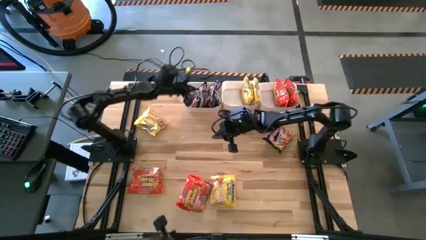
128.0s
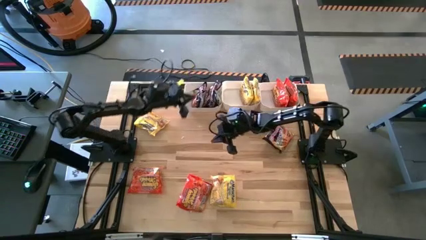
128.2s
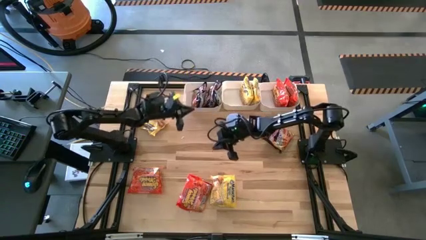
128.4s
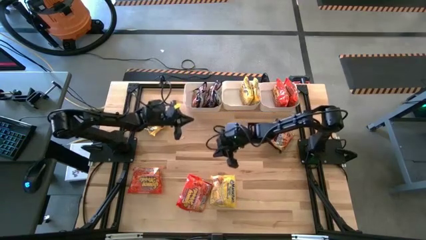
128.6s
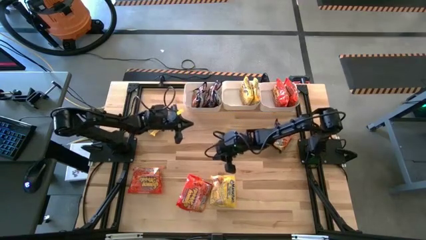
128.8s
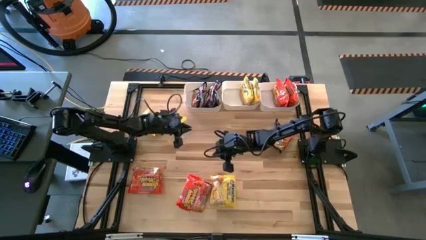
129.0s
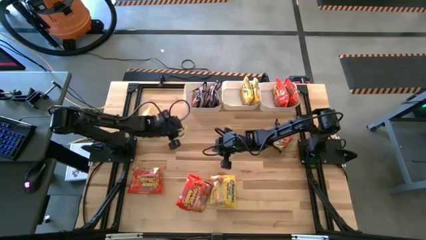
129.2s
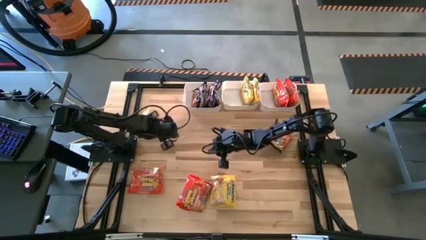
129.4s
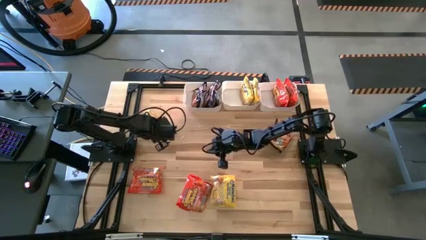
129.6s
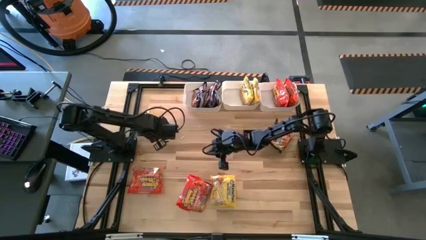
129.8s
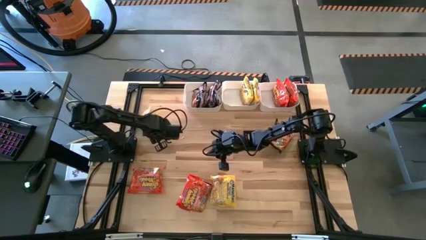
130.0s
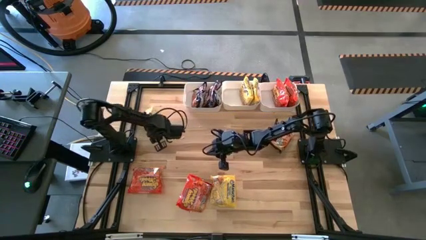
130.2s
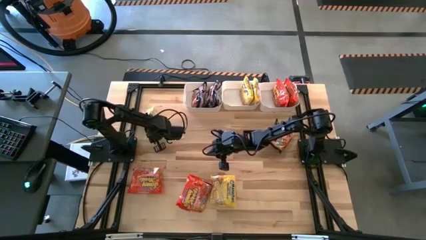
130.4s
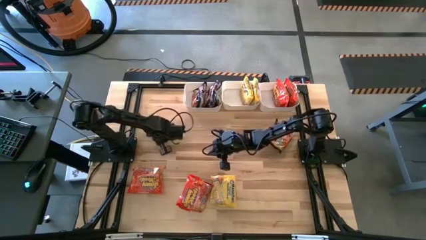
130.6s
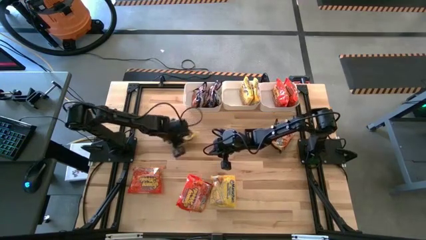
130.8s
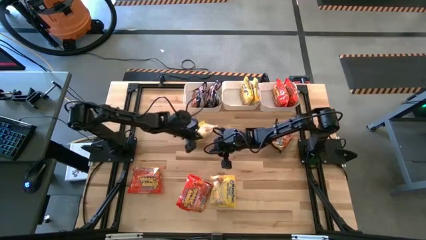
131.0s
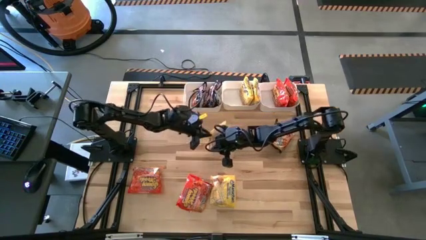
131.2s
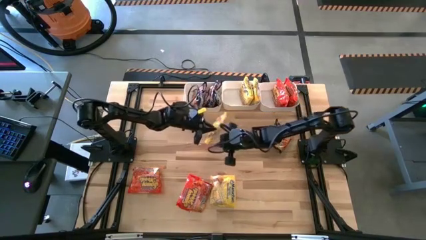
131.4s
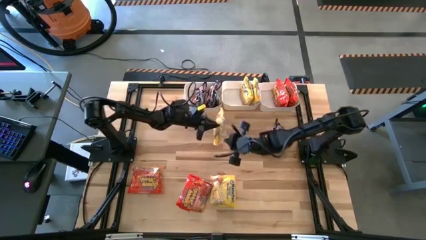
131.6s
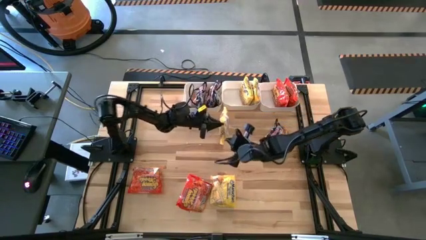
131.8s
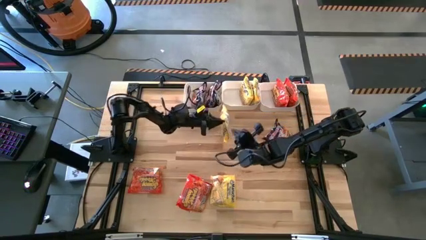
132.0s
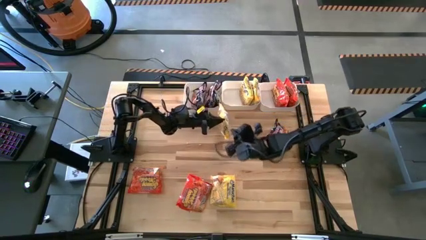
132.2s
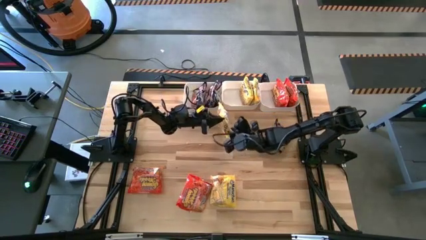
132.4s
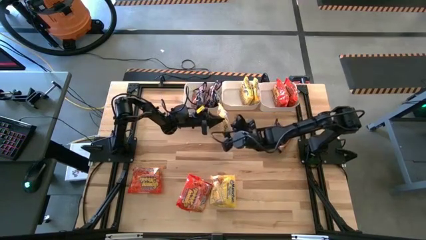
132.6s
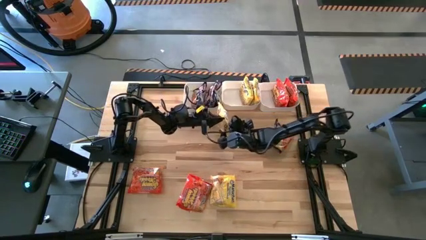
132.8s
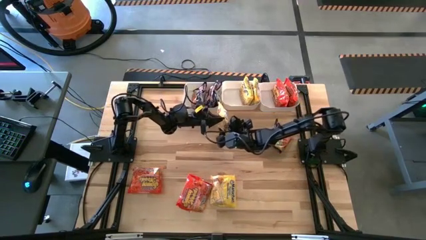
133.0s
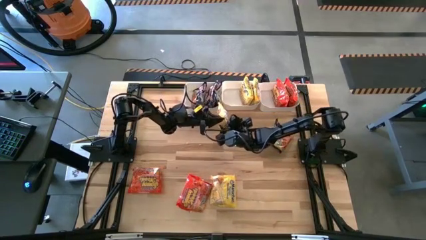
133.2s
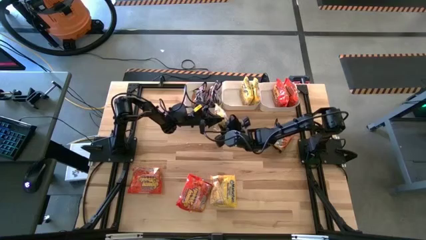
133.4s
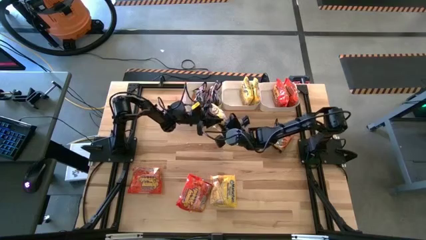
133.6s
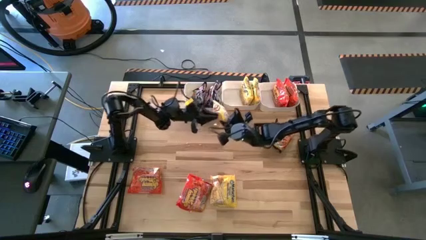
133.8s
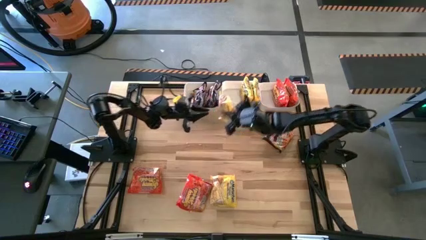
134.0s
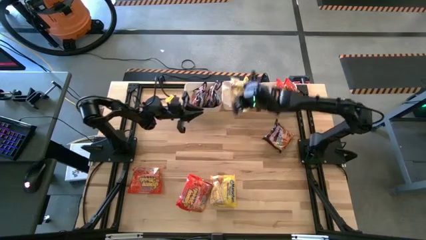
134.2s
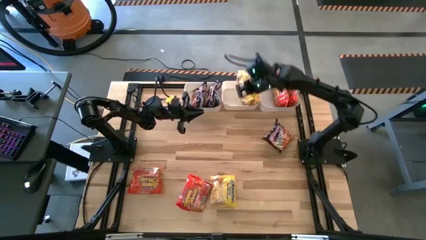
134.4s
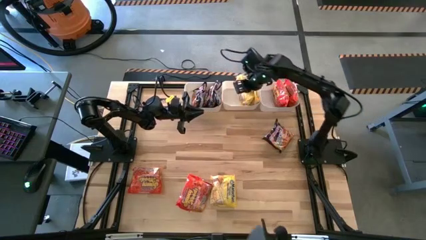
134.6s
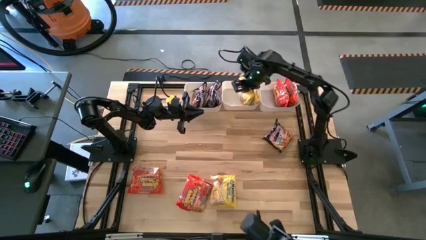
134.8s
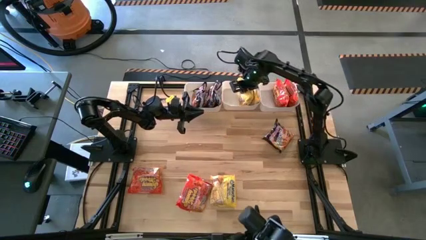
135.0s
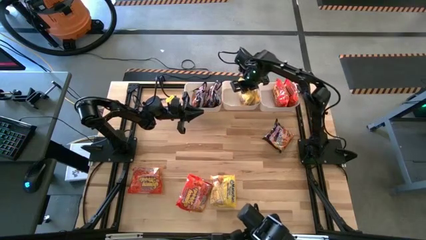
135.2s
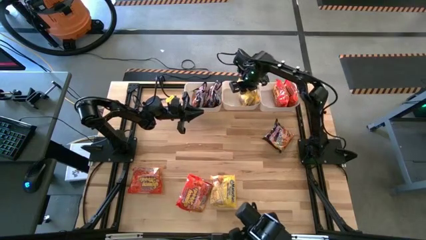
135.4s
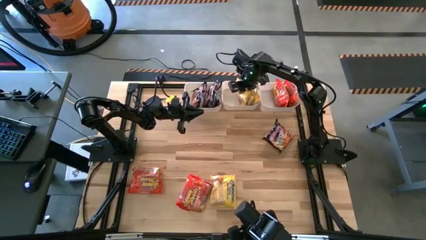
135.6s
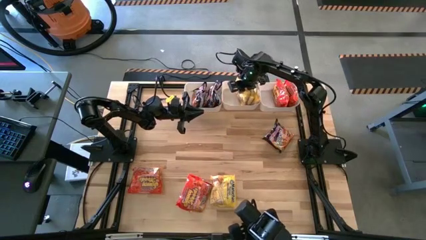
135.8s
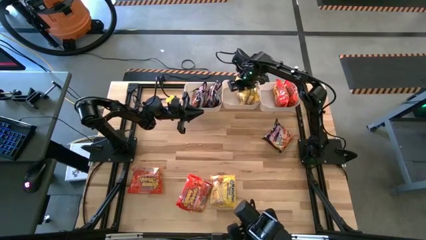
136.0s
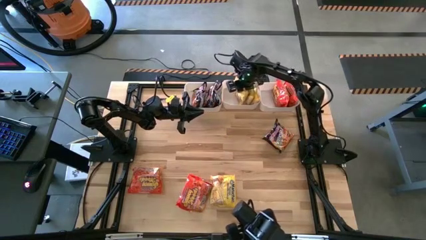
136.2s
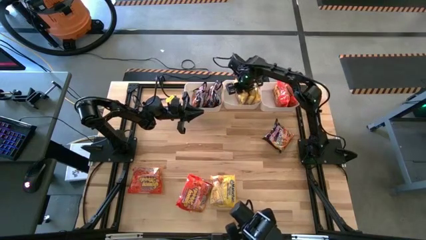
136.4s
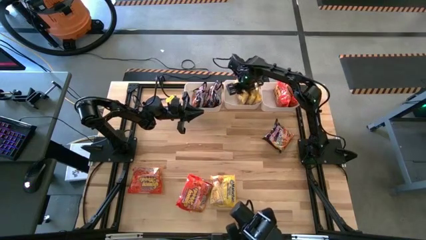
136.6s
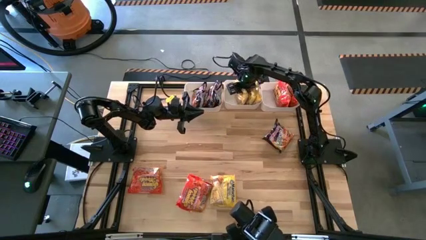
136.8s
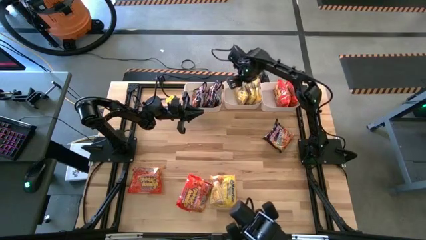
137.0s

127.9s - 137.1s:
Task: Sort Maruchan noodles
Put the yellow noodle into the center white bin

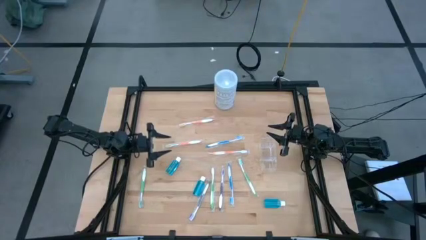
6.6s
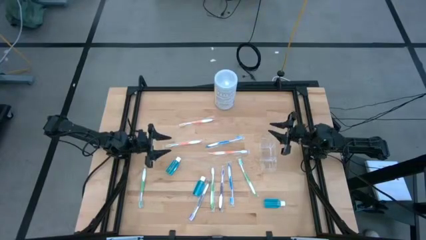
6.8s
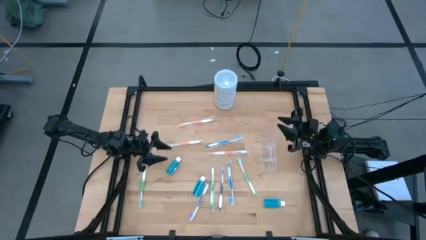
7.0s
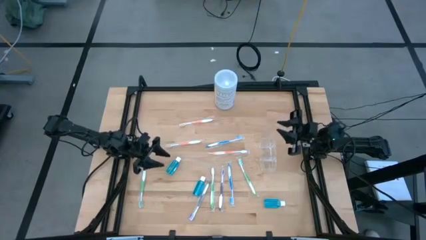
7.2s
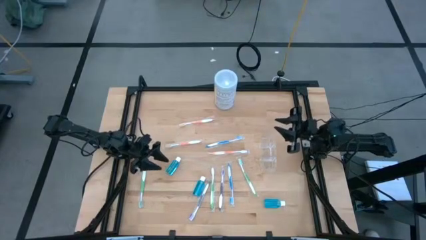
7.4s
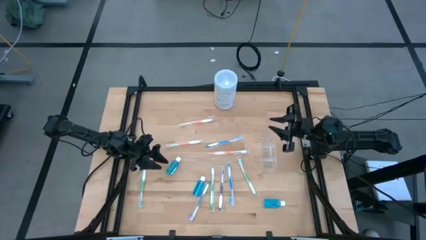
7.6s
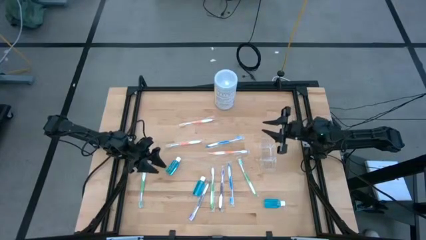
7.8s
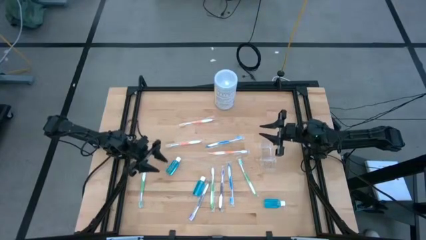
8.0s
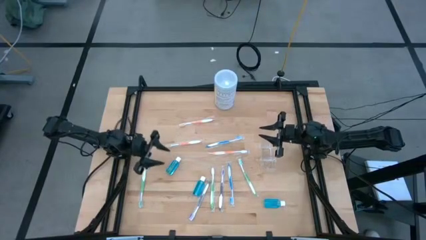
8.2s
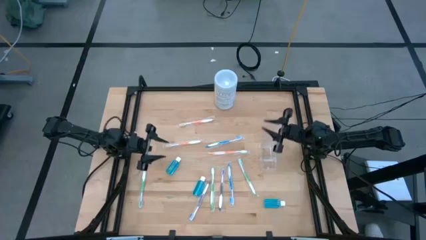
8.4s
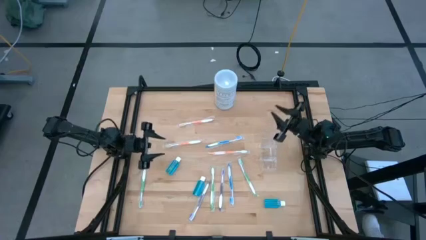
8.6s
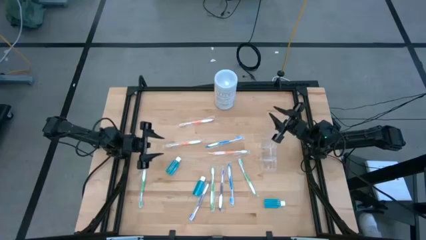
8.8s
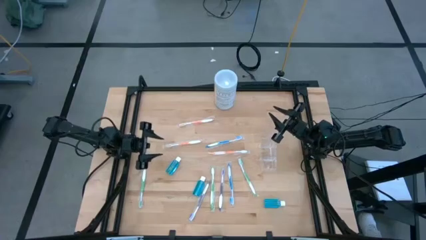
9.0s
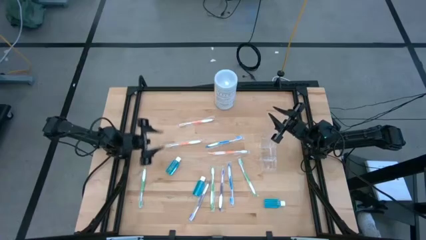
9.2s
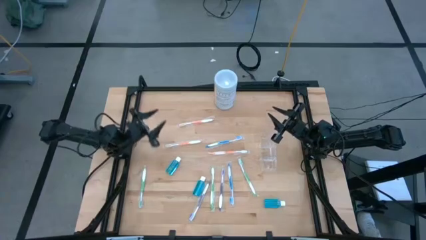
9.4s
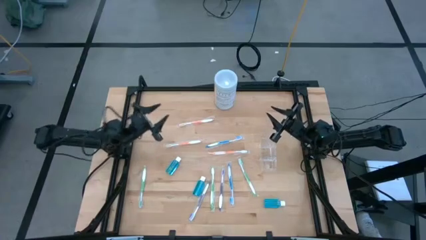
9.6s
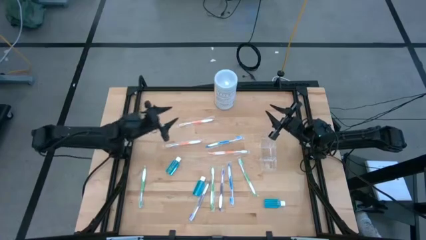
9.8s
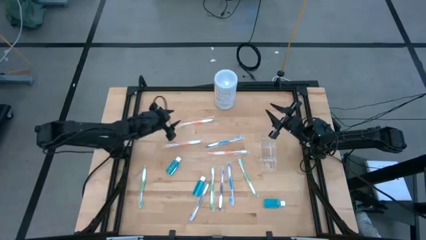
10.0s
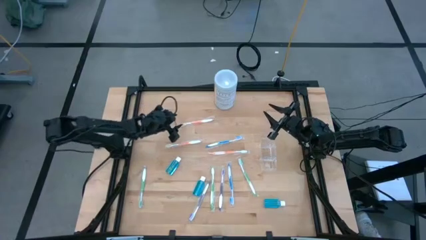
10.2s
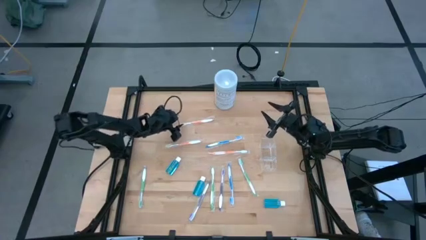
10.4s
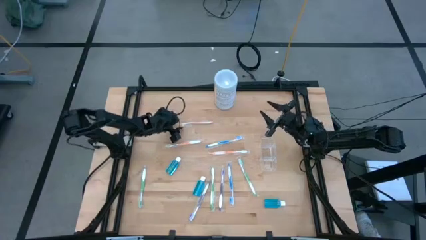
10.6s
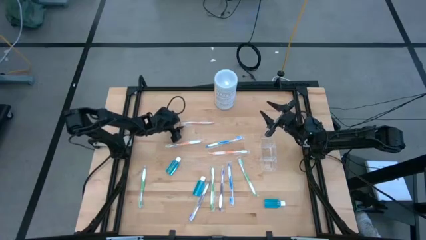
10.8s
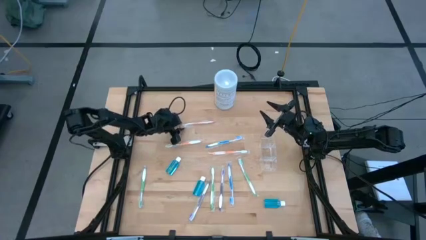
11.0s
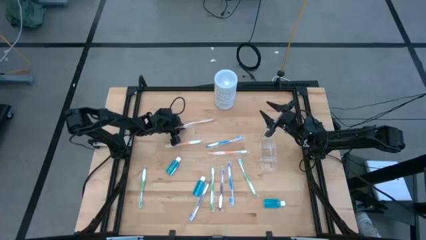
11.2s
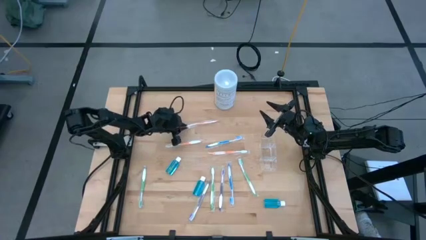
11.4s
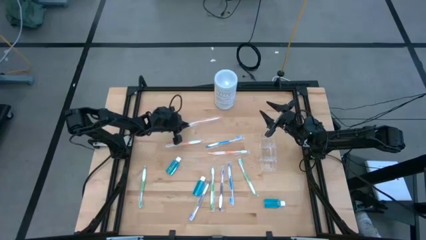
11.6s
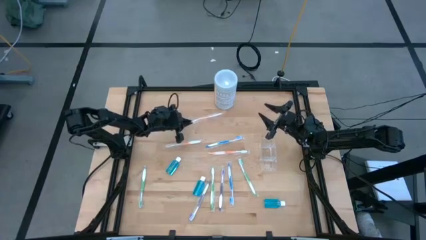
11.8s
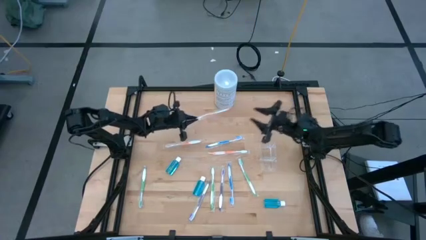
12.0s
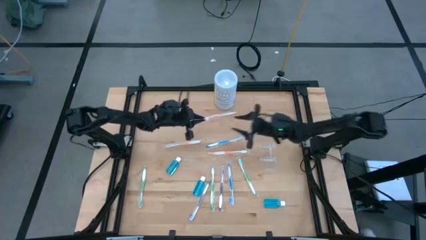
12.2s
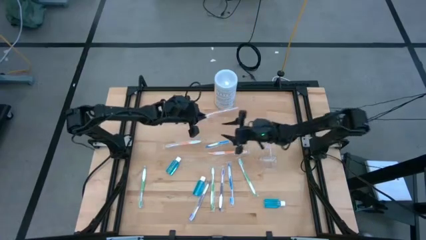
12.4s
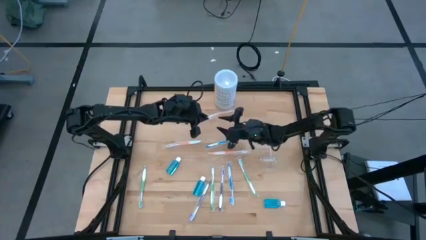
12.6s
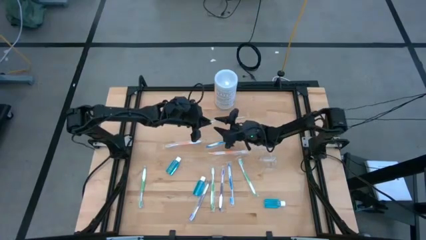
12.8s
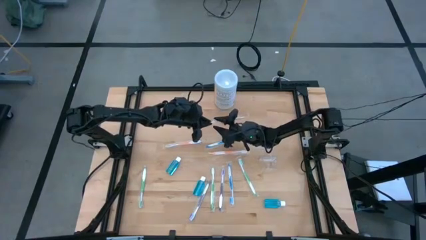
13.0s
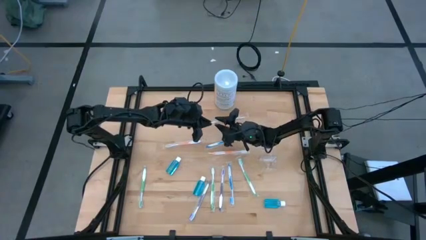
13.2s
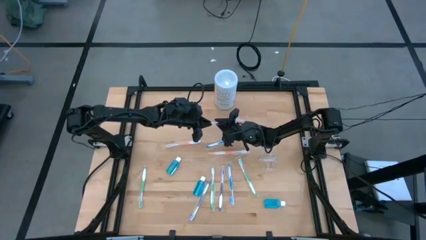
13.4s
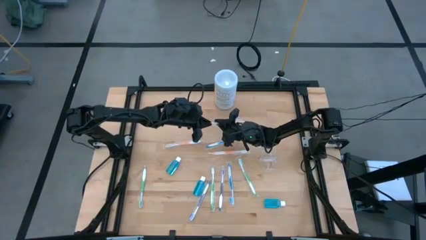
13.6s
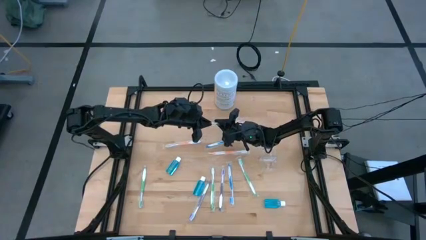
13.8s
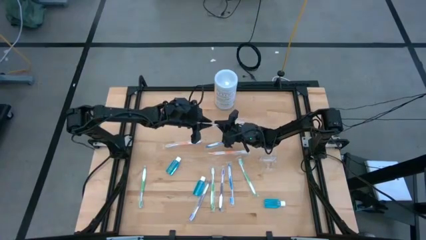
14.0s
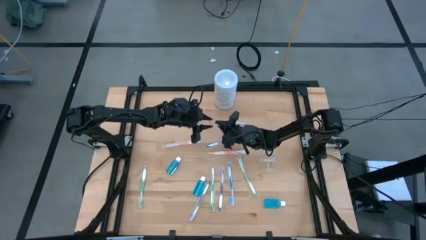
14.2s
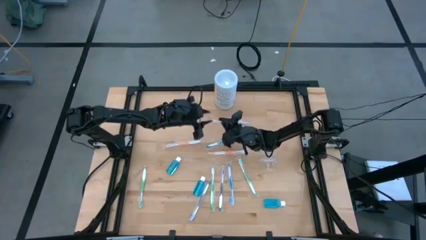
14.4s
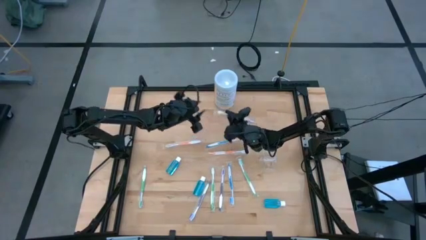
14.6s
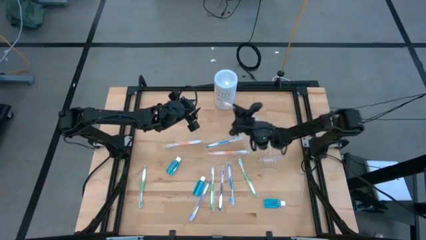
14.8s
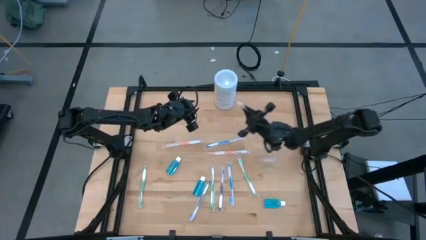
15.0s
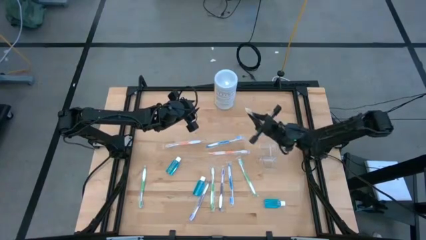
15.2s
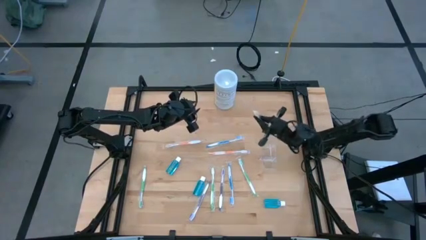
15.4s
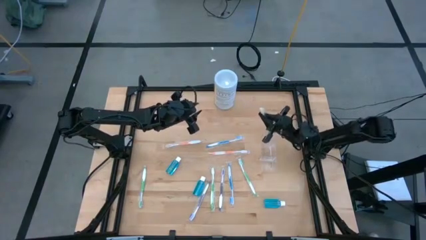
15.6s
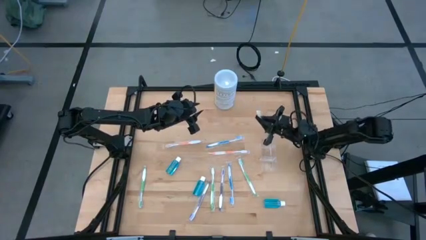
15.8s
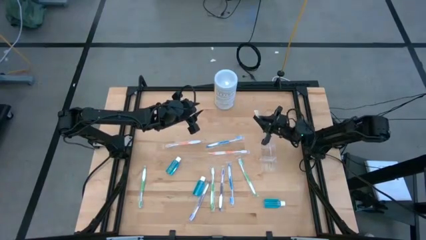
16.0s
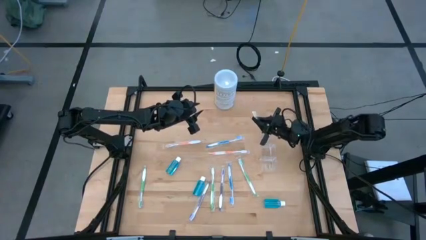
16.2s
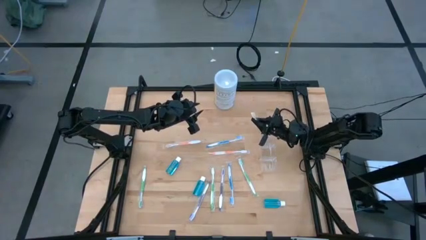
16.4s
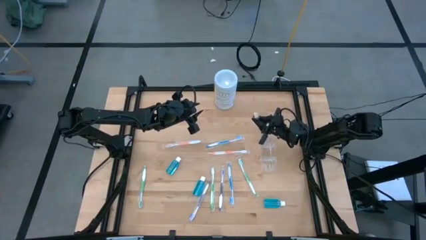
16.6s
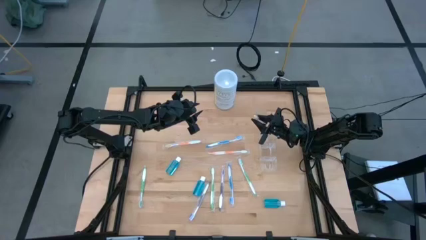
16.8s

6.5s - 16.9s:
Task: Pick & Place toothbrushing station
Put the top orange toothbrush into the transparent organizer
